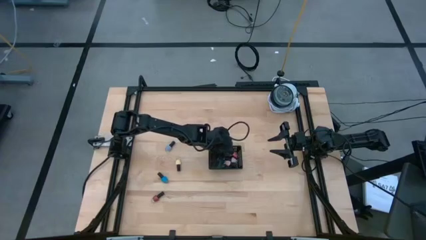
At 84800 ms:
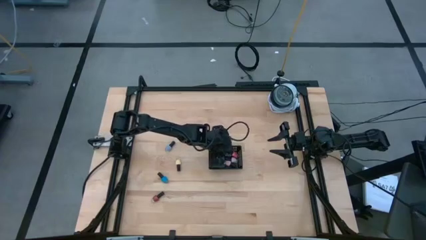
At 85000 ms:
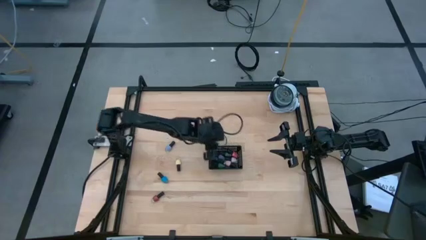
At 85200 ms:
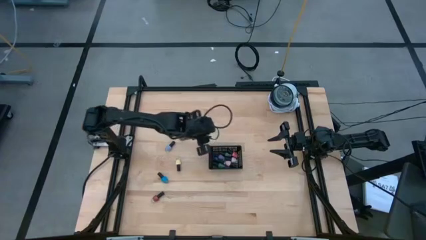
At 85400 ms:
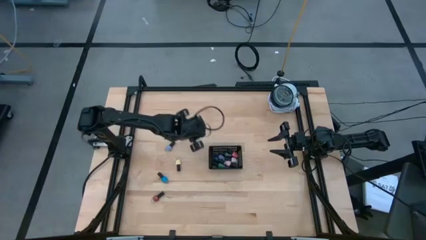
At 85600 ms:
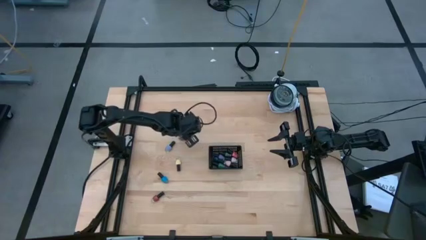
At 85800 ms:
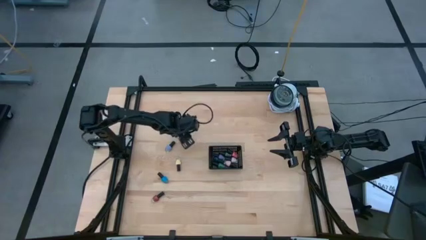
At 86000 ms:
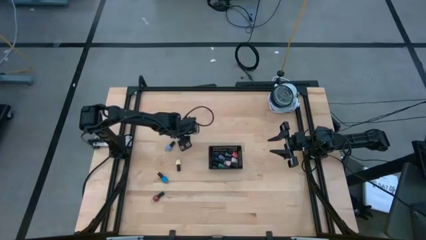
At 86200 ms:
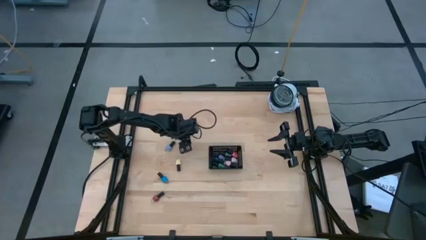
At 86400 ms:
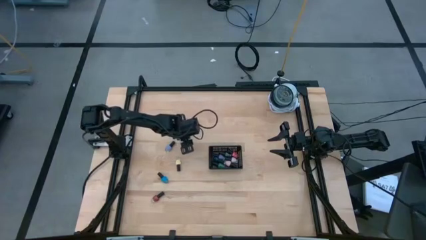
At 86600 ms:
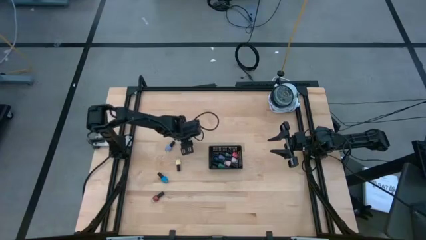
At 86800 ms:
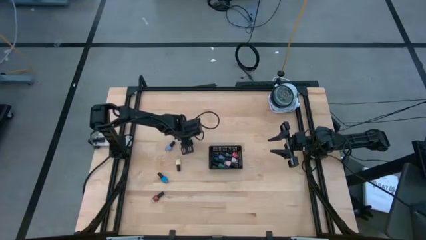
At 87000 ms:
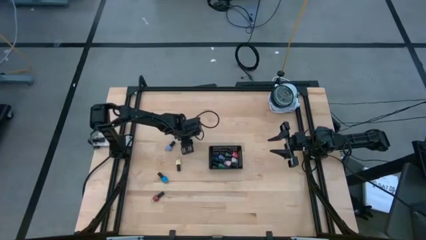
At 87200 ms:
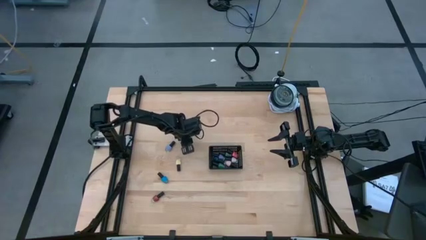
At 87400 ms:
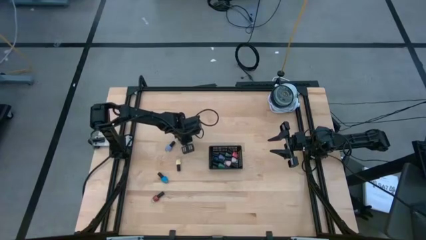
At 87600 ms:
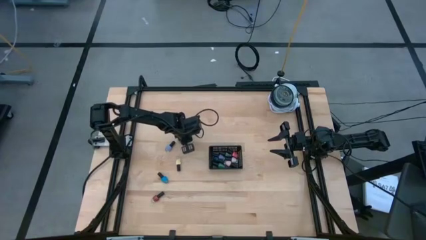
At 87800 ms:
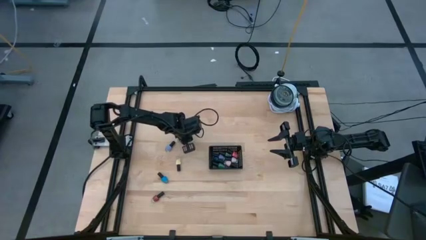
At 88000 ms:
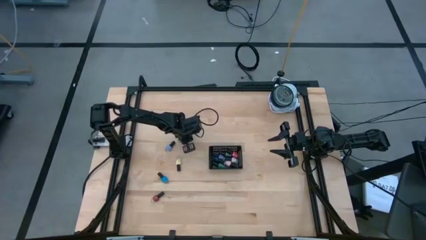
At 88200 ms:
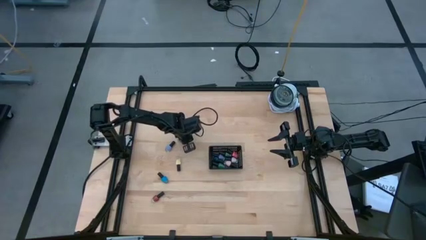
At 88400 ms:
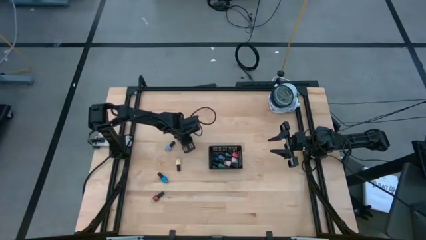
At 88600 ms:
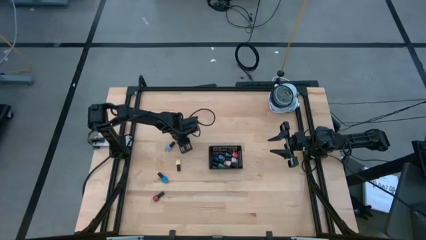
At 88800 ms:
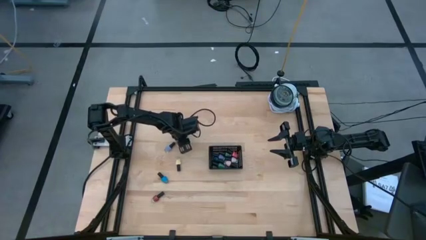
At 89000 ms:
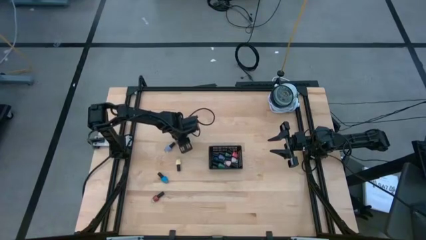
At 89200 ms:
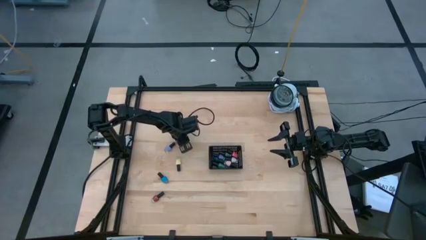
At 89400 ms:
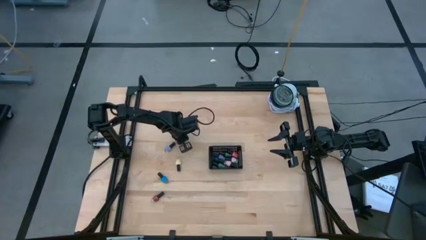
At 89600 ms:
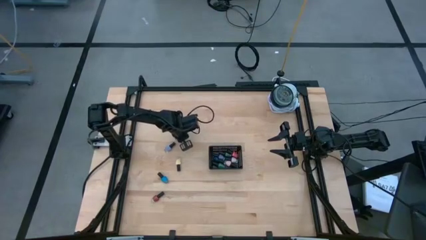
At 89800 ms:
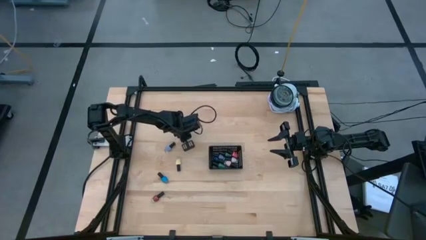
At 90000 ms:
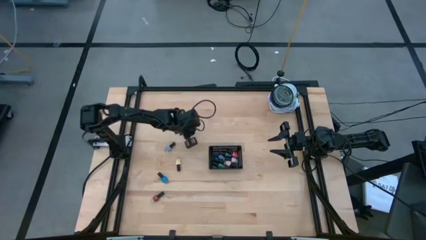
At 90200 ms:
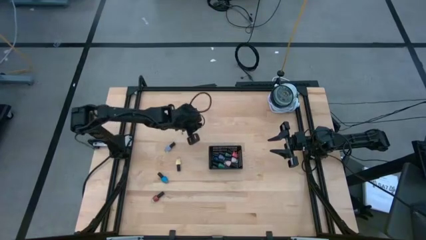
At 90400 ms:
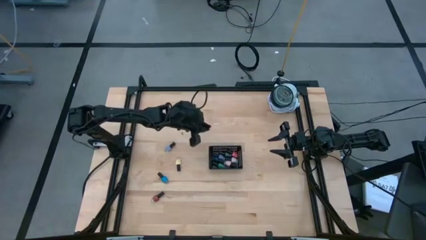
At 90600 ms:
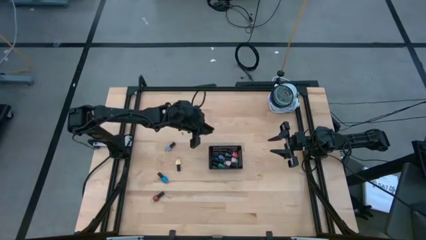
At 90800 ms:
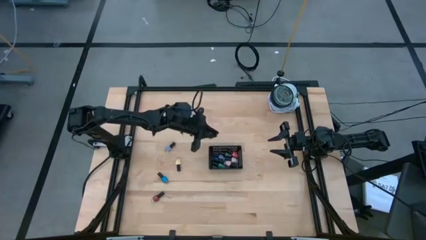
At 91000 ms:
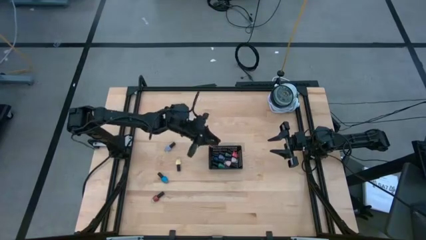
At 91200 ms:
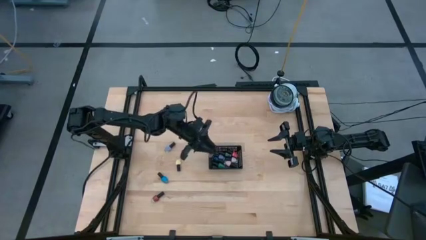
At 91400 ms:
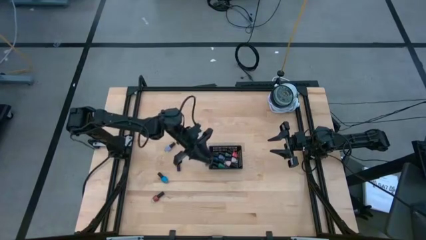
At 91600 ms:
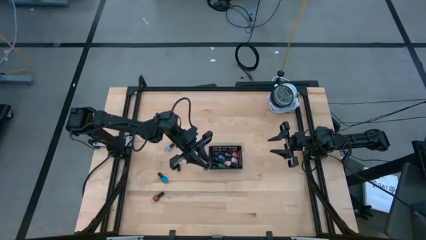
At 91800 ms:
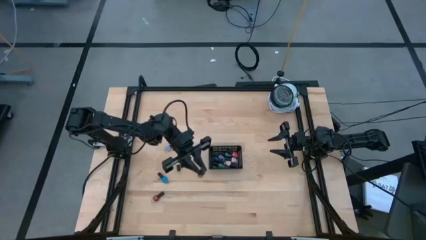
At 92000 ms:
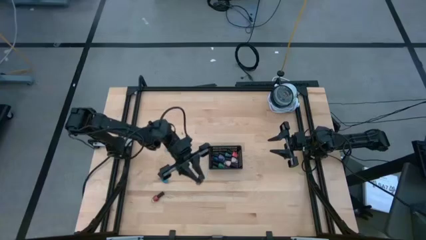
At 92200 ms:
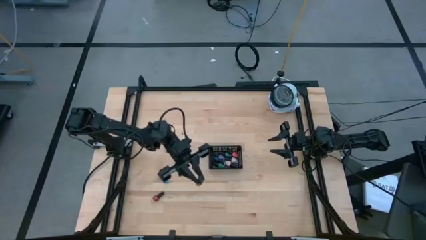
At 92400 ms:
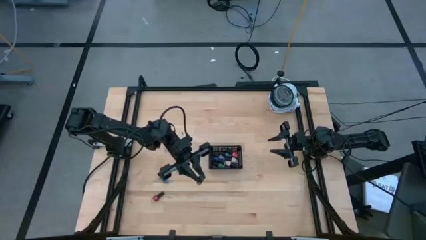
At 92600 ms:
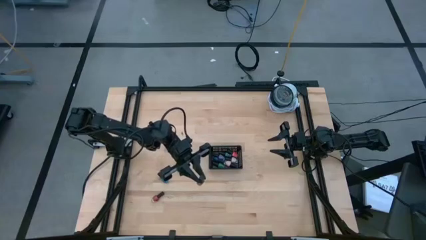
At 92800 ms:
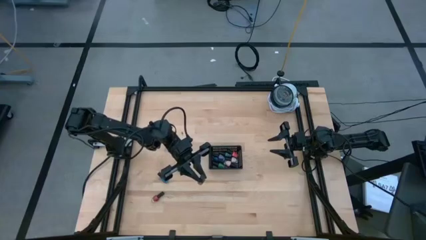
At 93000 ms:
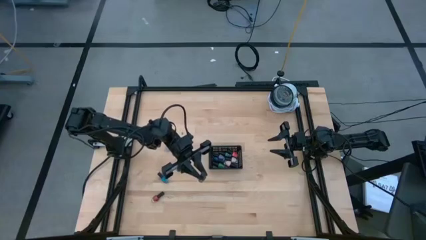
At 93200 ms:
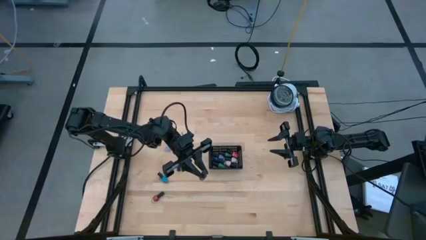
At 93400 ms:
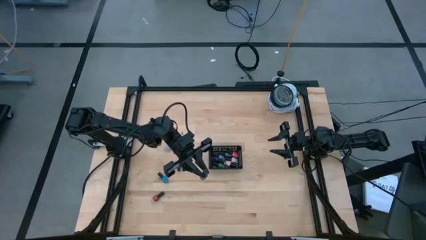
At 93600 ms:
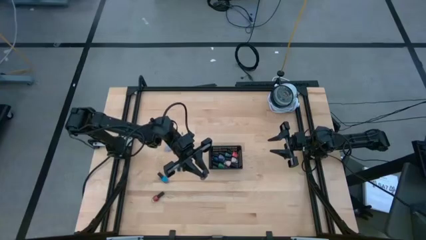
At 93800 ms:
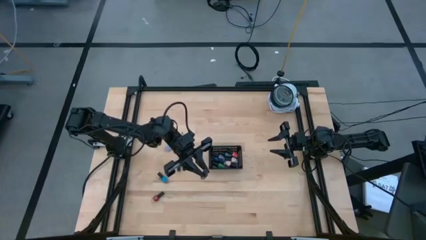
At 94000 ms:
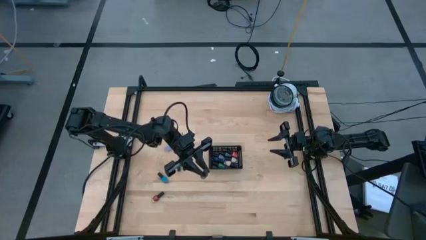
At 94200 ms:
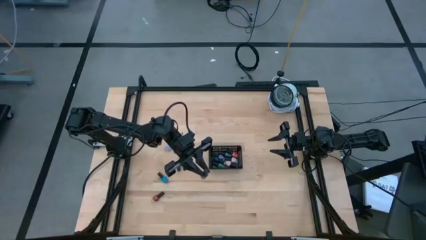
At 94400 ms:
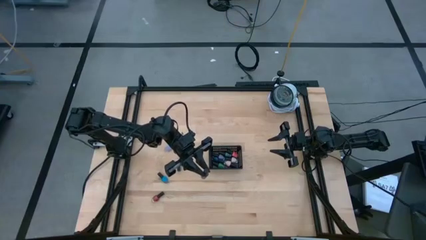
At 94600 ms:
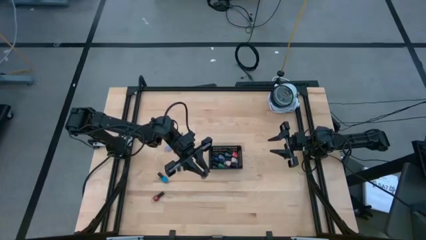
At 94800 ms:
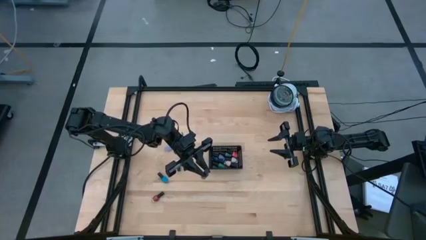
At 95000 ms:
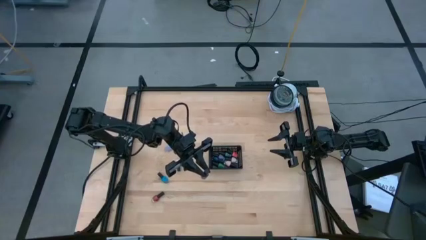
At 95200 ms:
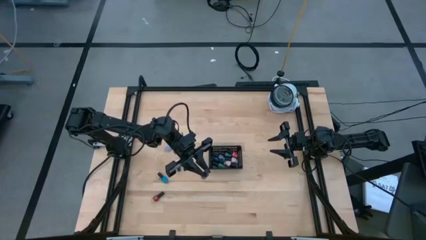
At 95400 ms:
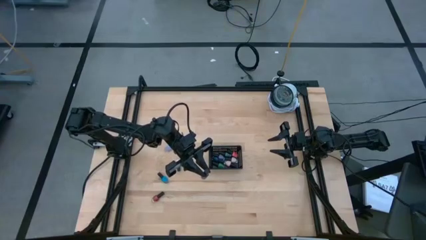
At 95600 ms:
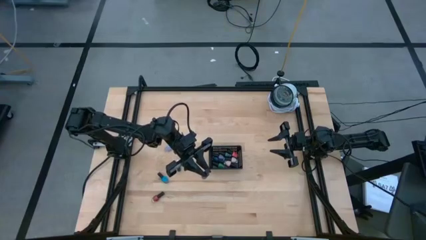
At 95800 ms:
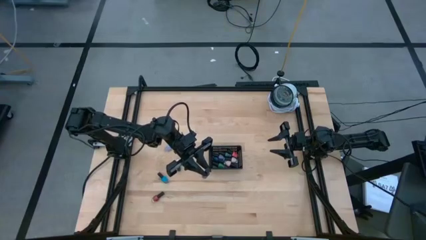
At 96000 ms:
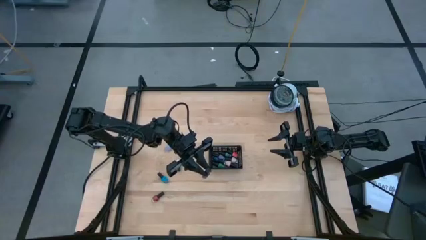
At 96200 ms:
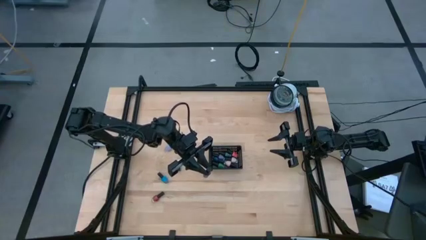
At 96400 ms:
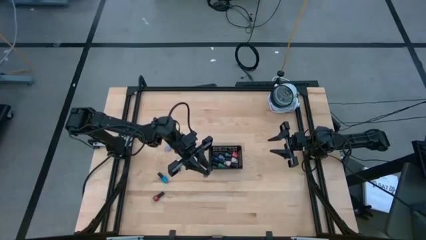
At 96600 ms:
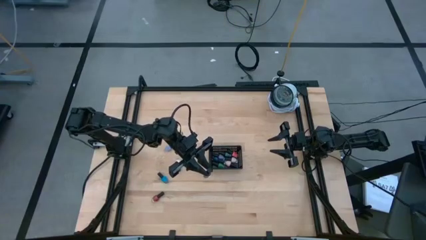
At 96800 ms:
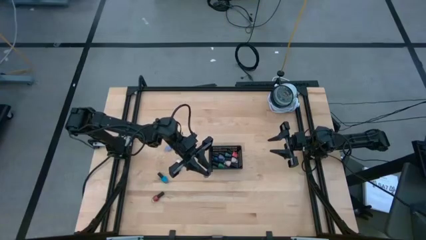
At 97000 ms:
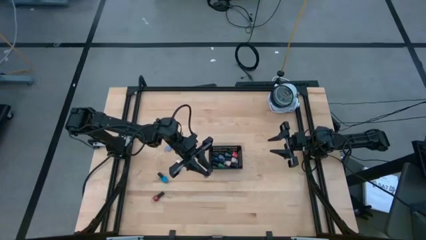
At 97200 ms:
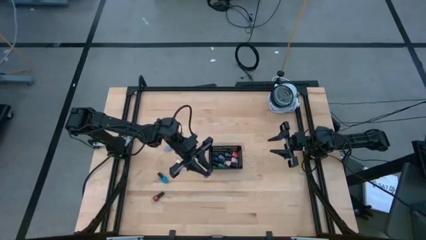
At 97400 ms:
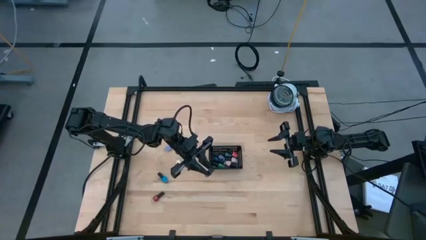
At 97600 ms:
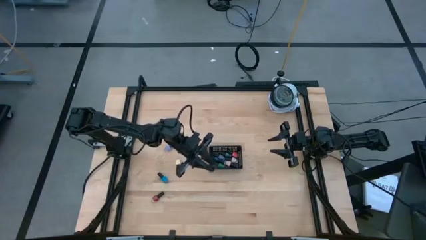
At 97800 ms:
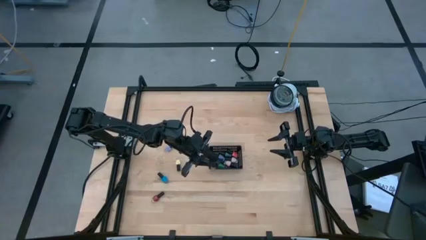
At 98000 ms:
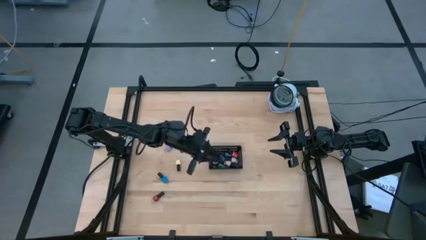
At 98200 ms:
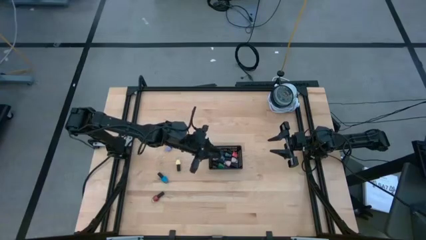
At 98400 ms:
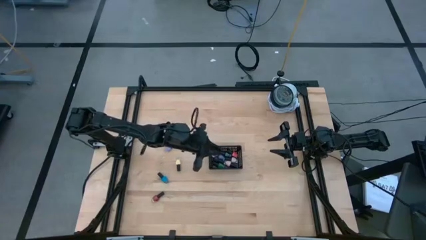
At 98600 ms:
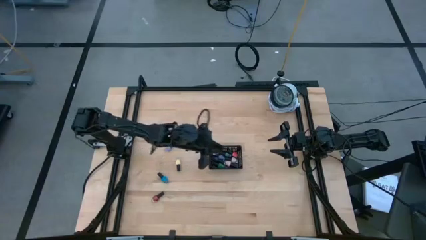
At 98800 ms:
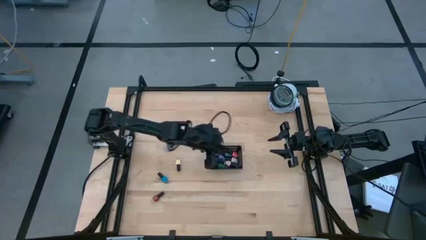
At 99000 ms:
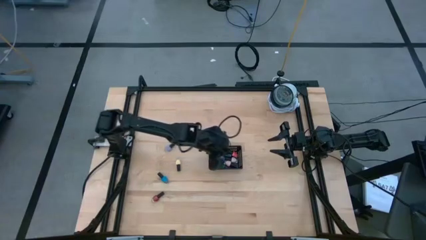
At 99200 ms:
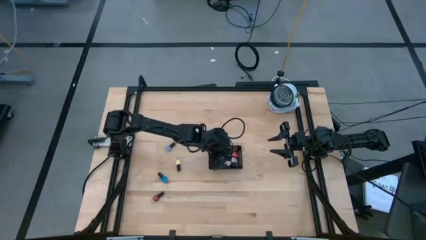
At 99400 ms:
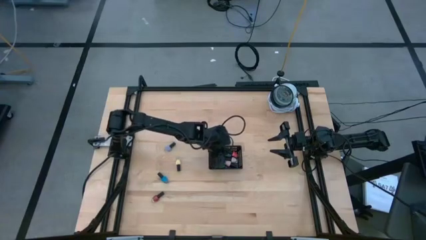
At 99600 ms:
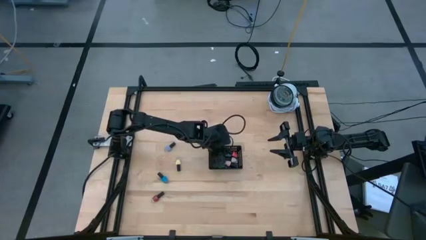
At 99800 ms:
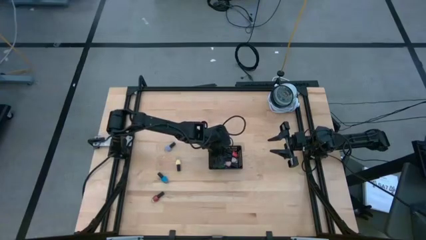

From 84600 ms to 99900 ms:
Task: Pick & Place Nail Polish
Put the purple nail polish into the black bin

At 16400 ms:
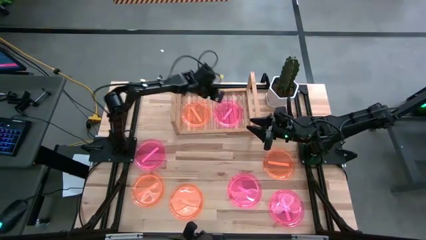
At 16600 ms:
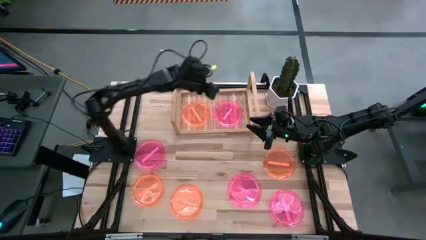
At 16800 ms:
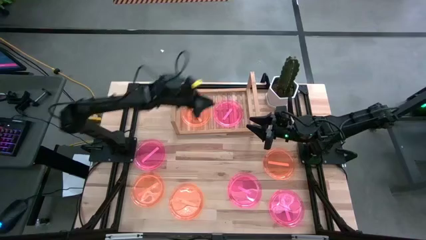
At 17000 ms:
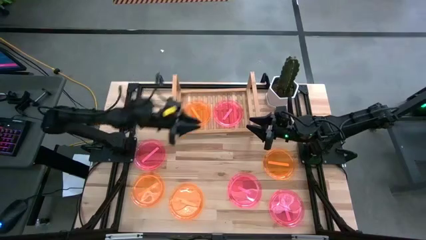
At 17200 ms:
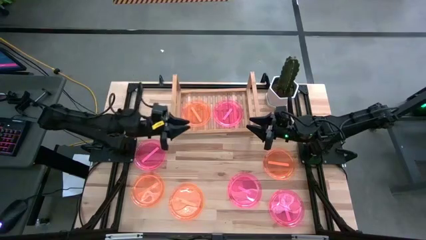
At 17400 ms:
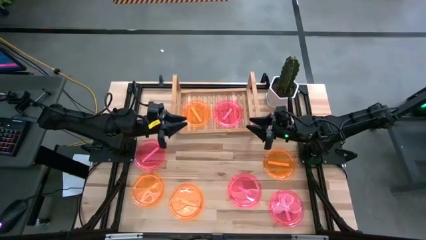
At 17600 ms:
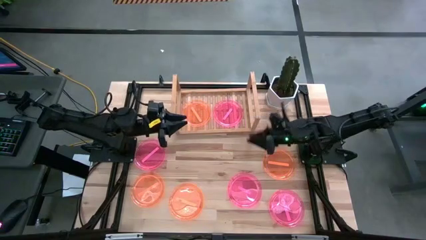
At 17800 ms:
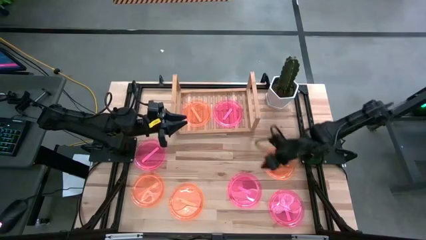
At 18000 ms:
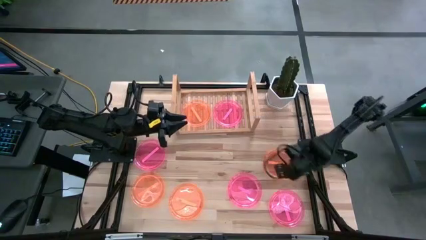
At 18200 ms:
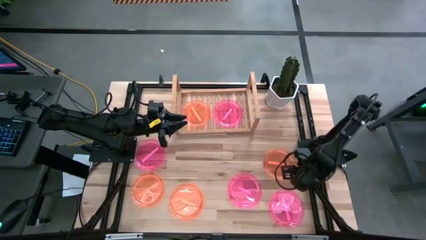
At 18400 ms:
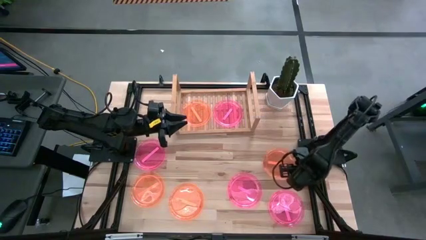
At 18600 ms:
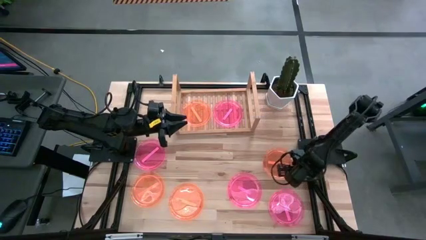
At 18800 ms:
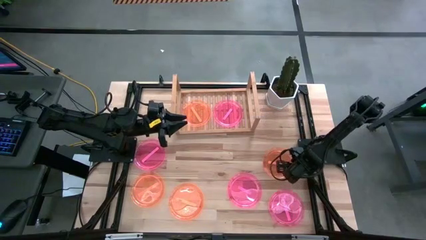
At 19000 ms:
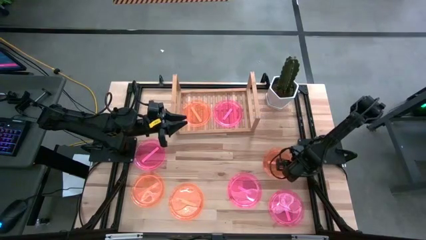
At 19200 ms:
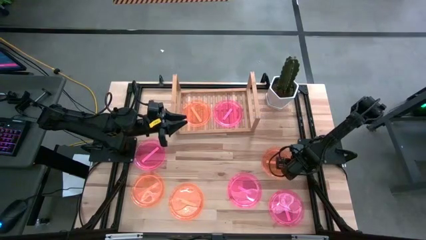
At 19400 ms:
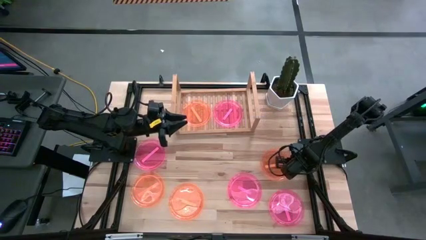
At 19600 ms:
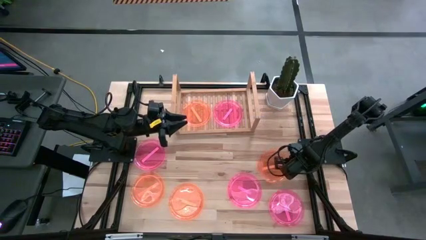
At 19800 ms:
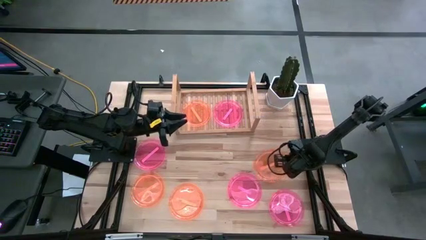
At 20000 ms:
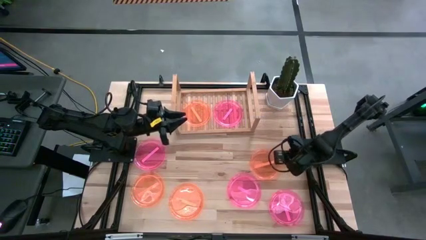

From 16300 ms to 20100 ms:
Task: Place and stack plates onto a shelf
Stack the top right orange plate on top of the orange plate
